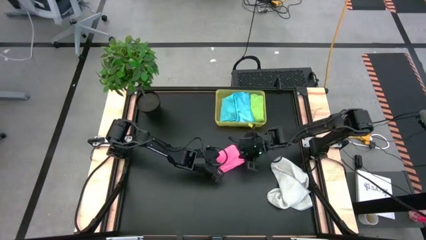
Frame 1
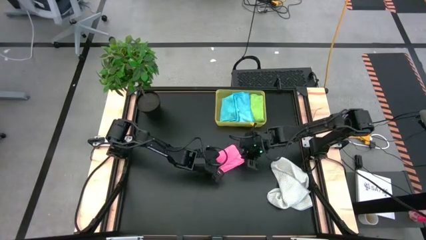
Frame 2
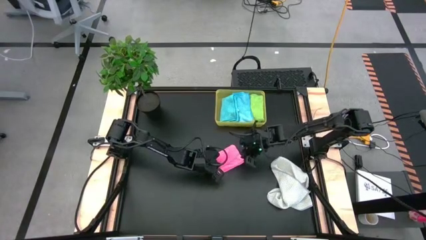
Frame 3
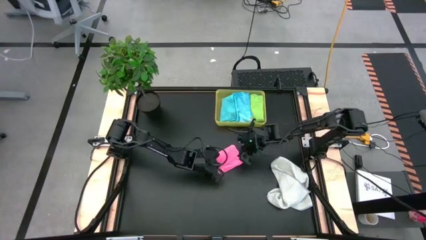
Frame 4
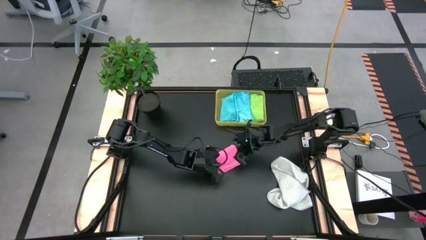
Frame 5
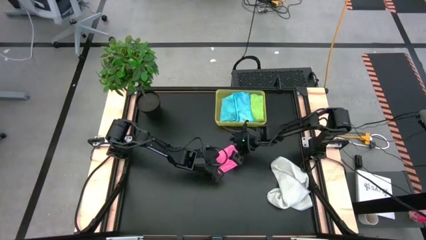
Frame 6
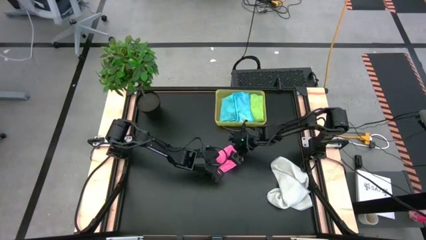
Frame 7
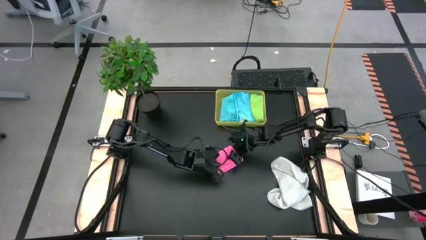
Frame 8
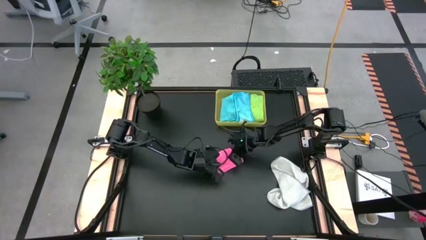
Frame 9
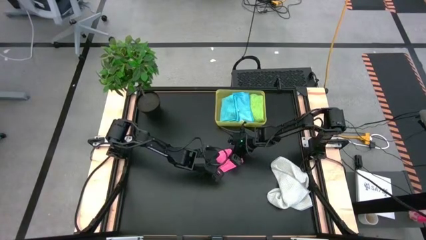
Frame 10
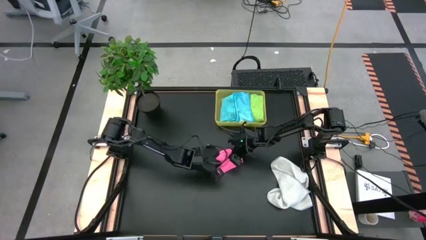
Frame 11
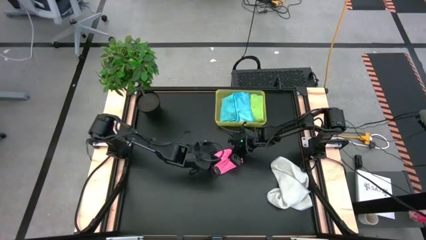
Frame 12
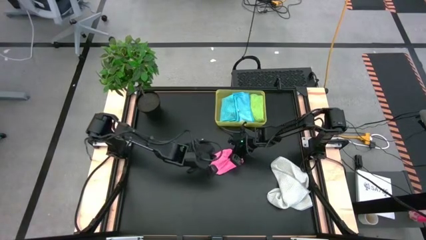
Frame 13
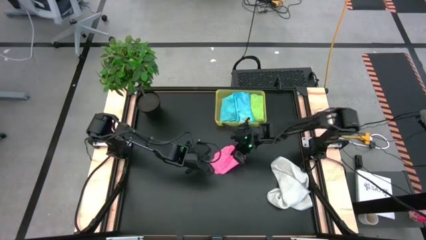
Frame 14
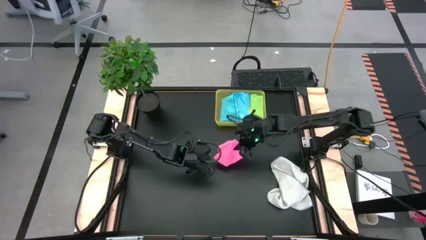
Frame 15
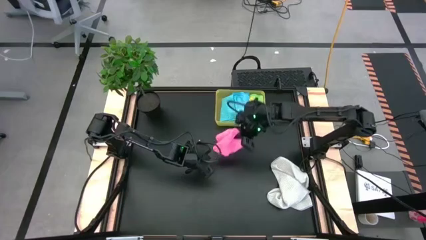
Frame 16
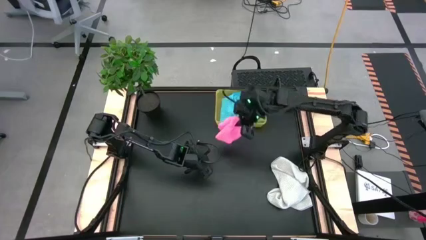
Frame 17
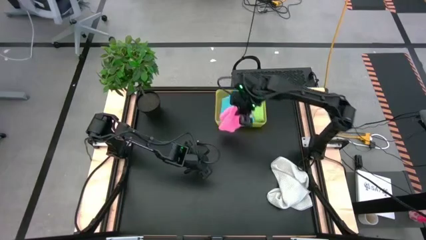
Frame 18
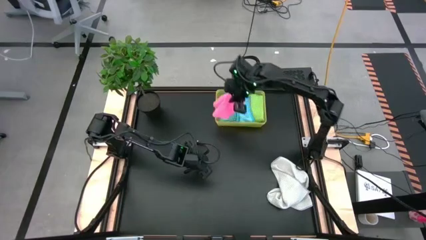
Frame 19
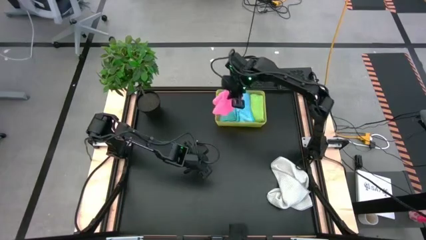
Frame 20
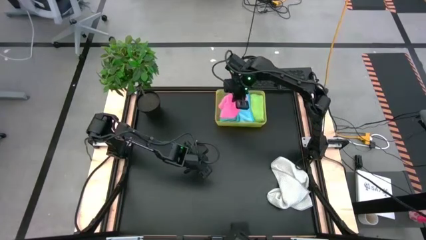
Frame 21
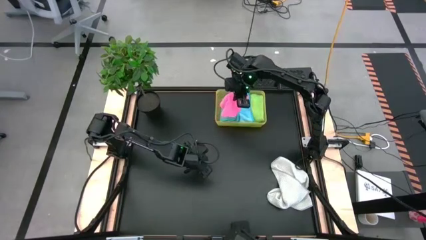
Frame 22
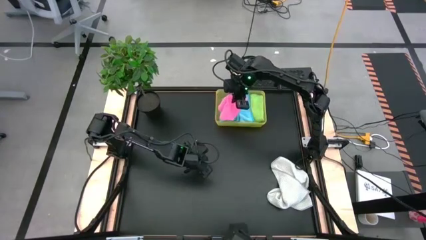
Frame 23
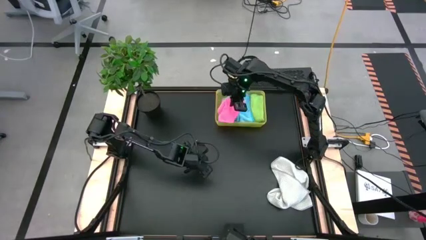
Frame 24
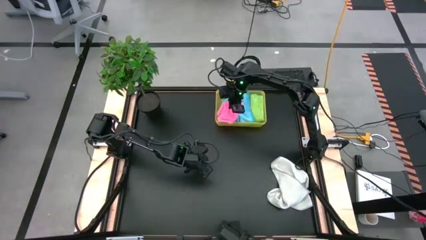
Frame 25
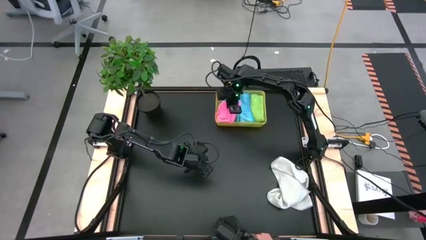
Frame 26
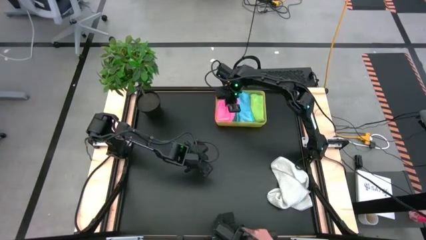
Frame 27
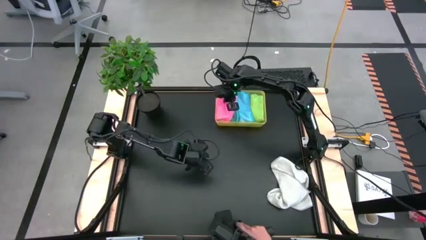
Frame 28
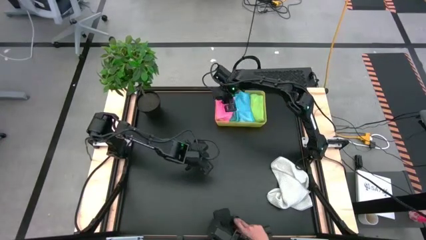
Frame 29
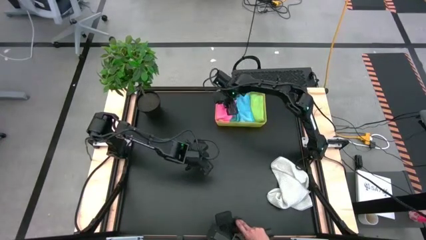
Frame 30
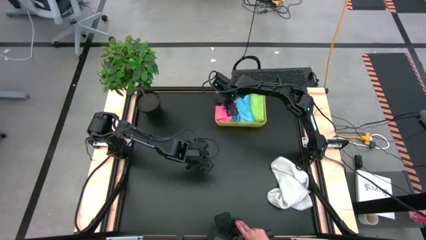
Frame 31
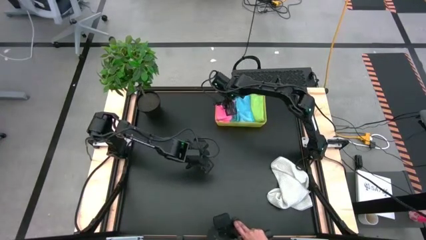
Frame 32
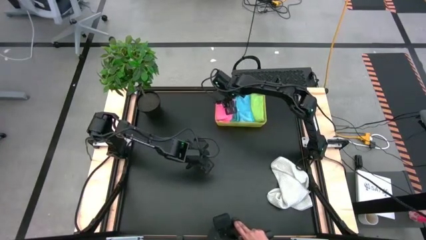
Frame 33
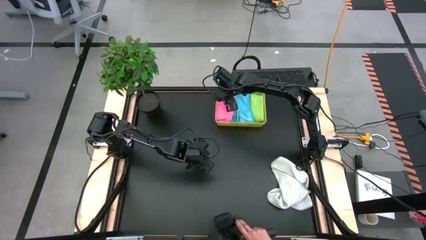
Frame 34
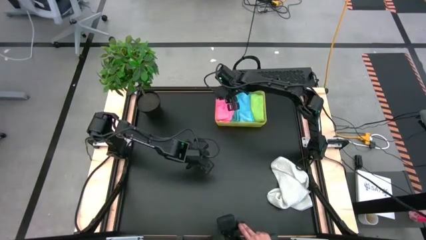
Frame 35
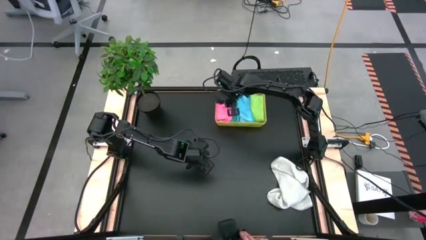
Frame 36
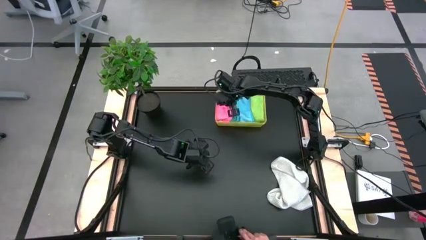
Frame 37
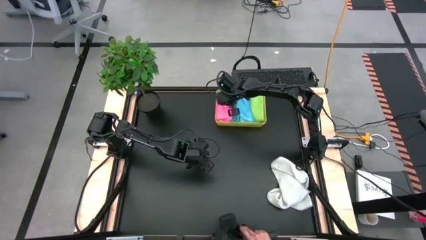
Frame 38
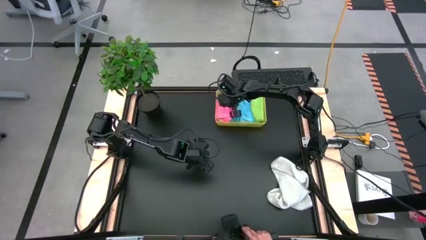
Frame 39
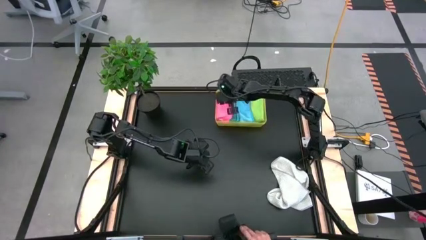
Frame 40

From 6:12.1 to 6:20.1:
Task: Fold microfiber towels
Put the pink microfiber cloth into the bin

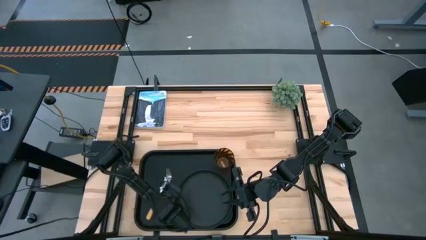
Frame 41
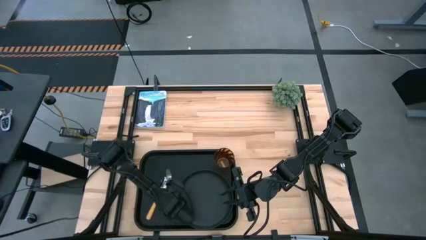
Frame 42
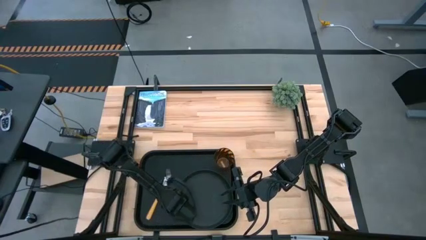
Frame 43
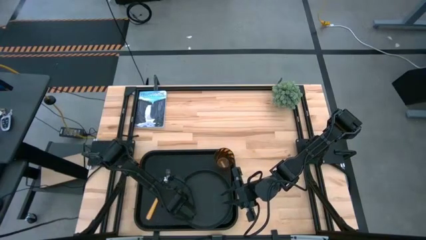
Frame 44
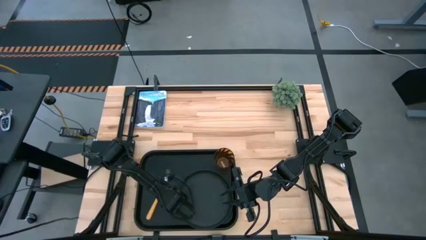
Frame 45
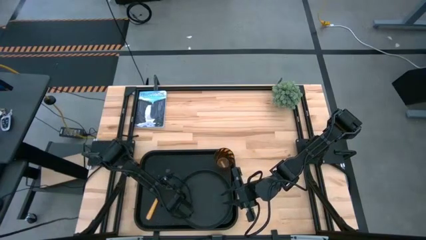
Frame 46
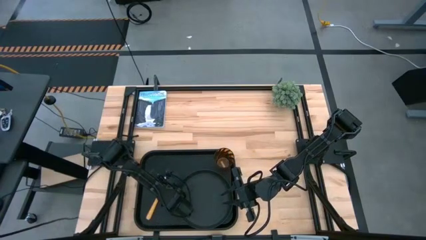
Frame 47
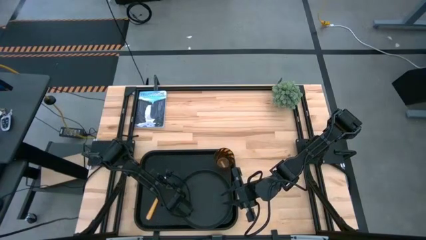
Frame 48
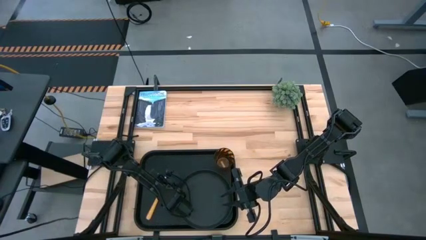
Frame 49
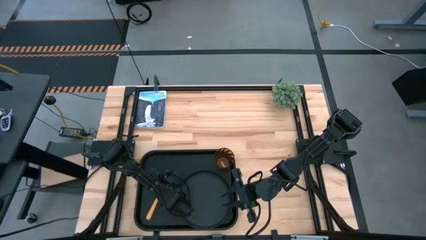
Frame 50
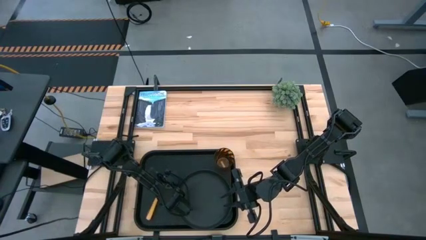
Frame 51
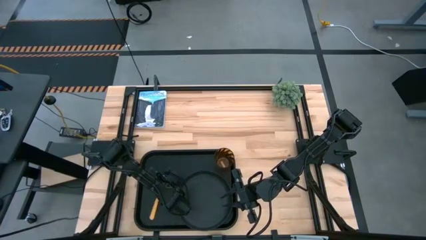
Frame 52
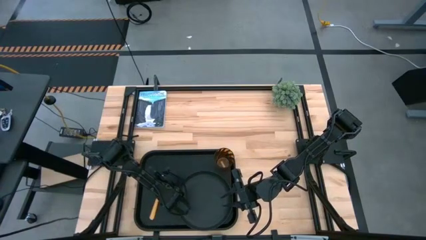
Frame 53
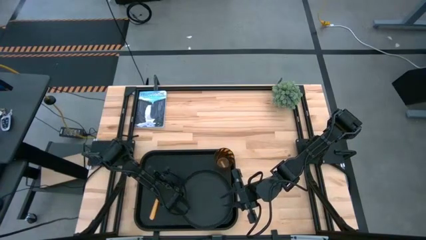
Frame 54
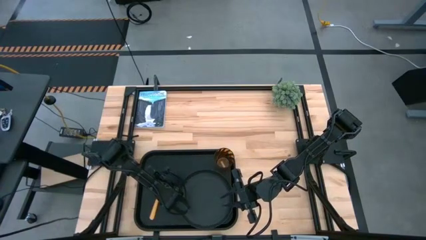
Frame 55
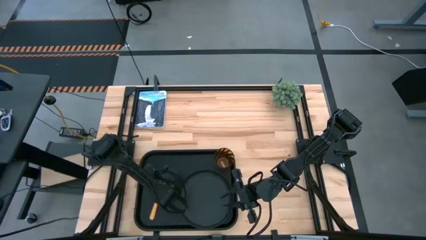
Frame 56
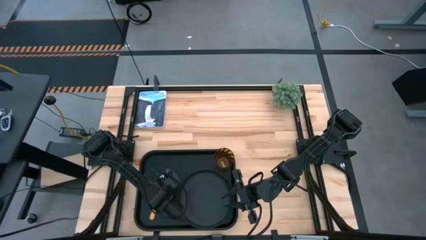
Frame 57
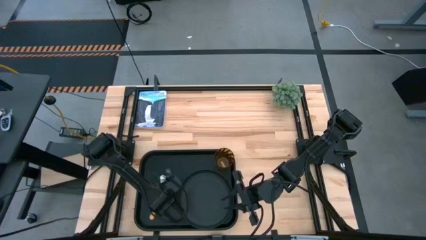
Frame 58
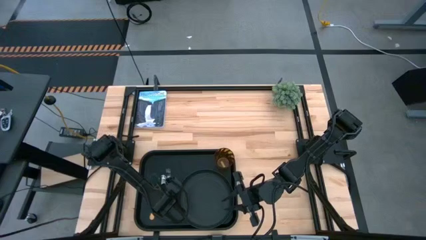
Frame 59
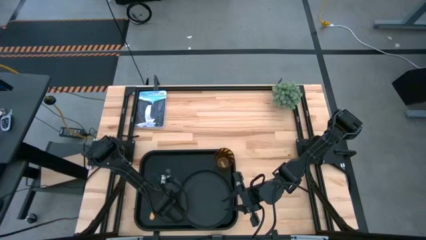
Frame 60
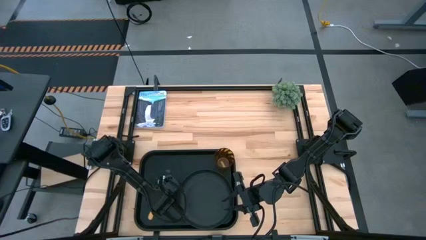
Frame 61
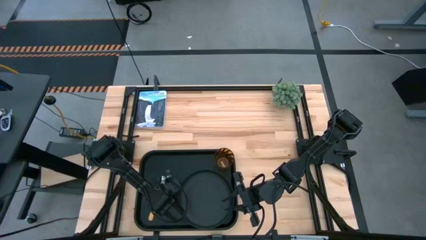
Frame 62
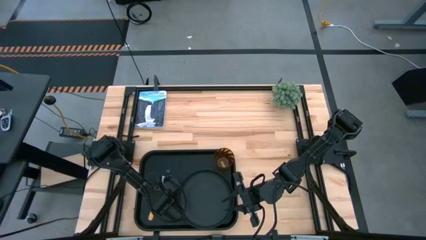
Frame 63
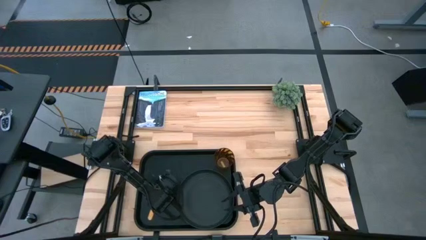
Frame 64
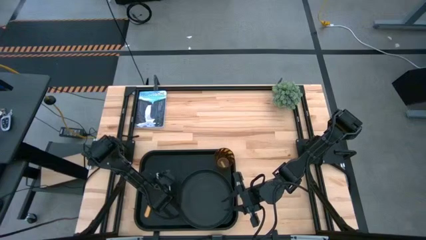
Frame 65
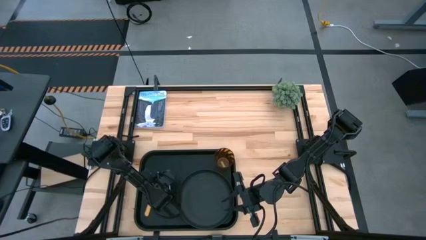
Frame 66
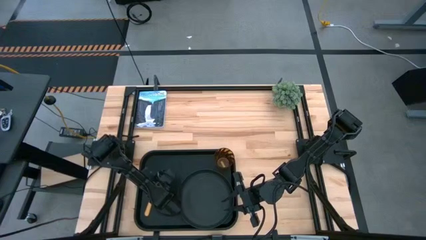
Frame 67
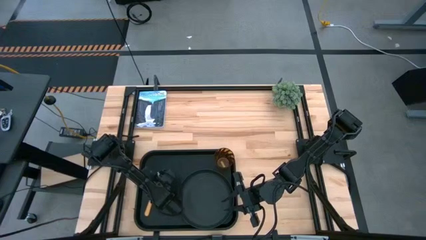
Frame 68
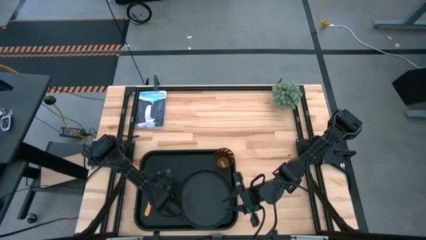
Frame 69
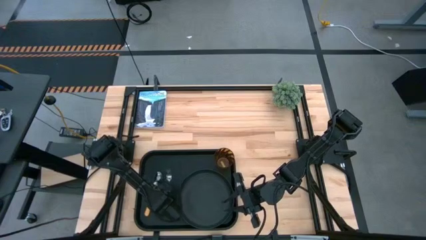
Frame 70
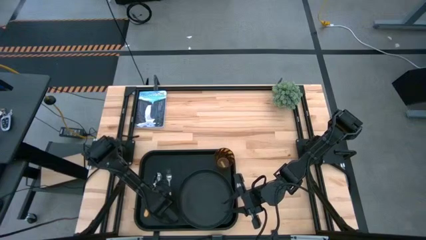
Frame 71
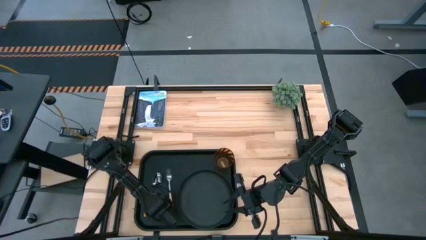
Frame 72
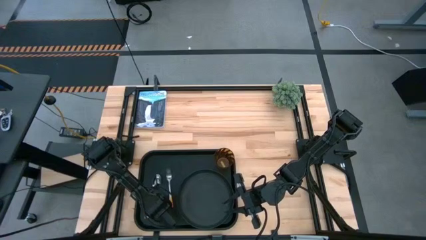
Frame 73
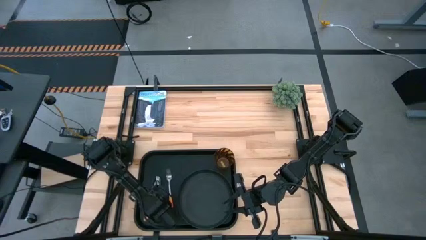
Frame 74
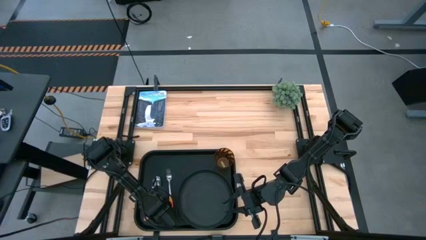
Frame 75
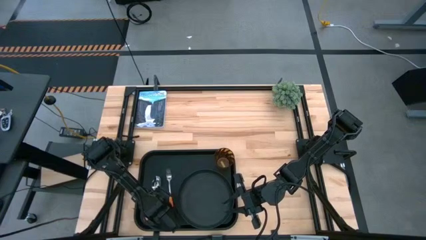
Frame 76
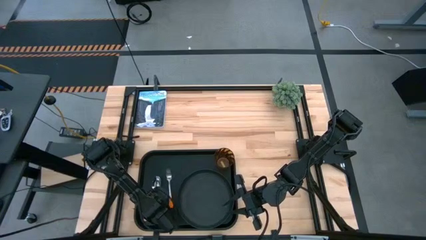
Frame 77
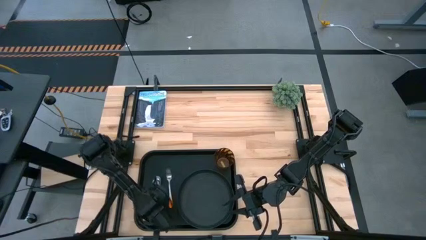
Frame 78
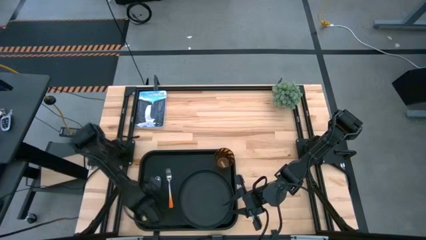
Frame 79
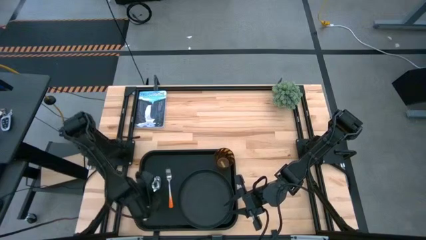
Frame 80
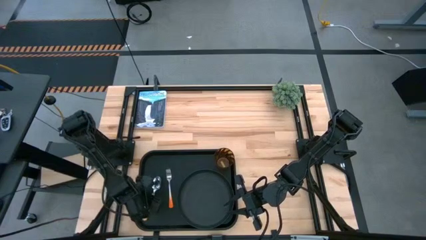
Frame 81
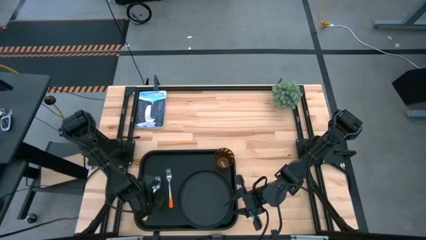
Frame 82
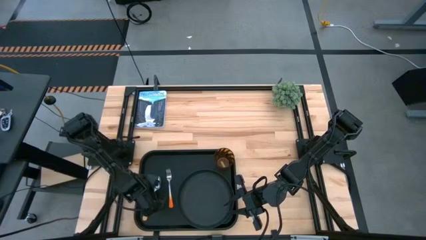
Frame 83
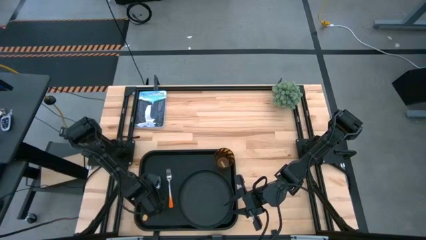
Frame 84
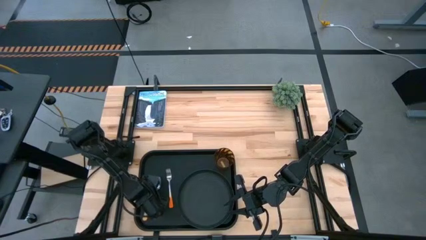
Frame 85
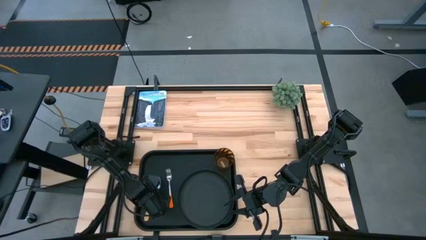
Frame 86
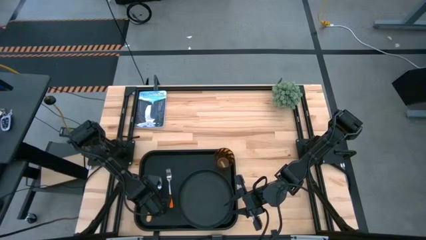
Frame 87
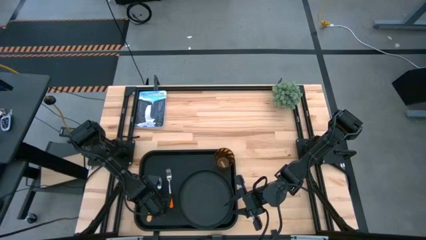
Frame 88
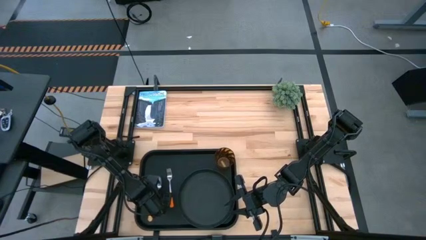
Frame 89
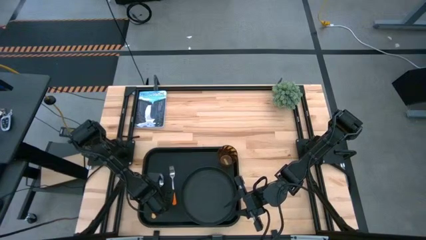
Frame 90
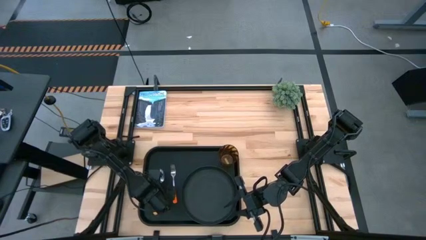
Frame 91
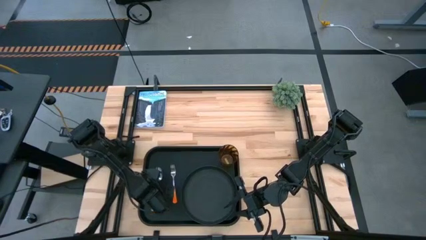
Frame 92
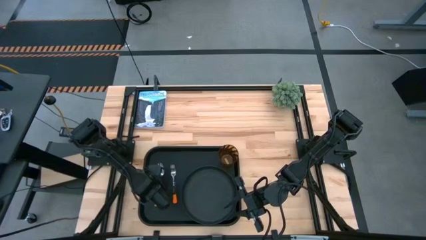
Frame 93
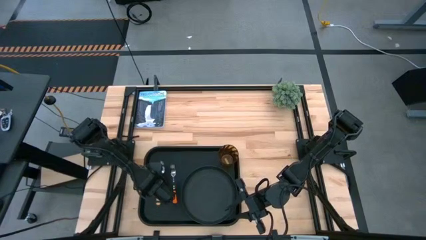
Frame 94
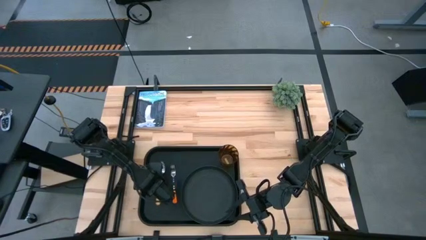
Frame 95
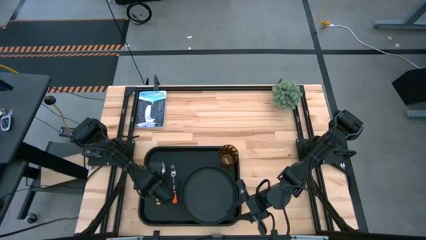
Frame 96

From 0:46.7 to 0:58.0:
Task: Pick and place plate/cup/fork/spoon on tray
Put the yellow spoon to the left of the orange fork on the black serving tray
